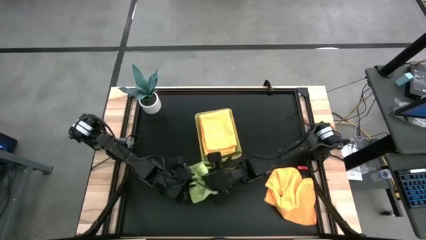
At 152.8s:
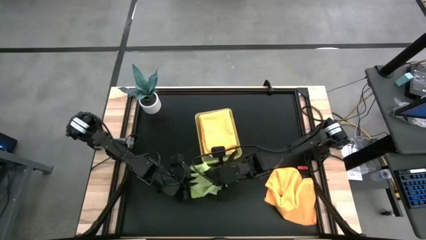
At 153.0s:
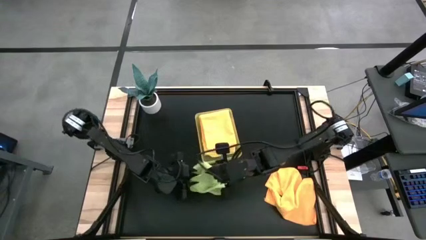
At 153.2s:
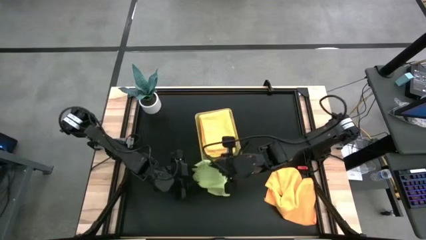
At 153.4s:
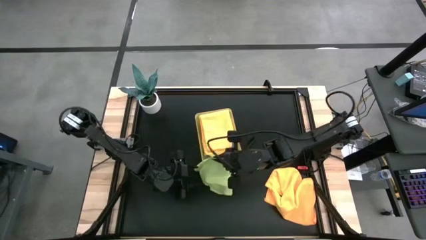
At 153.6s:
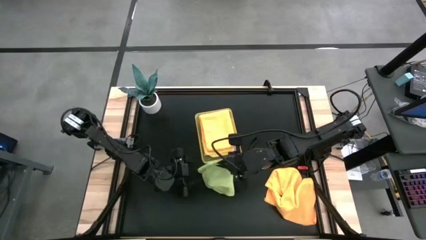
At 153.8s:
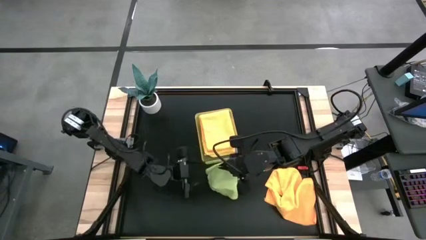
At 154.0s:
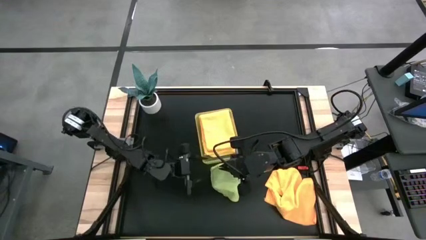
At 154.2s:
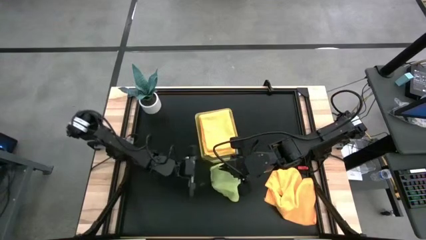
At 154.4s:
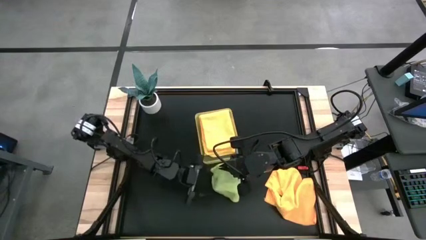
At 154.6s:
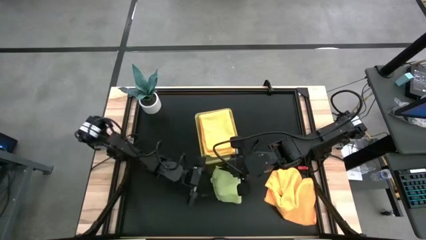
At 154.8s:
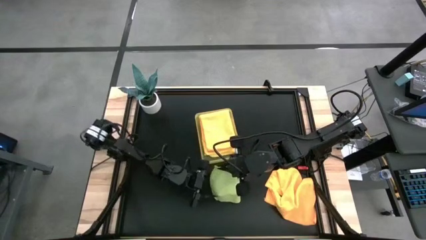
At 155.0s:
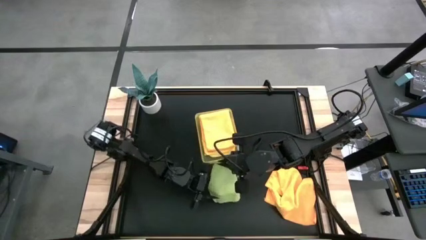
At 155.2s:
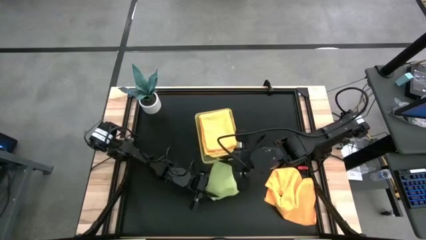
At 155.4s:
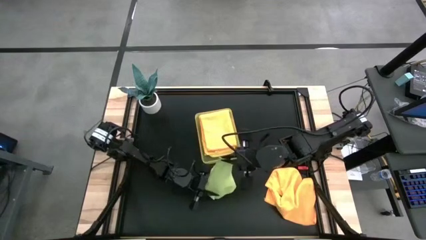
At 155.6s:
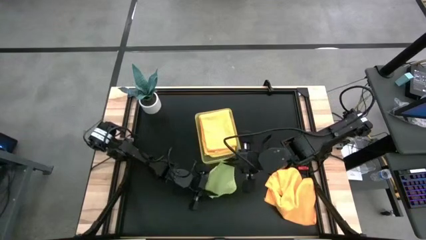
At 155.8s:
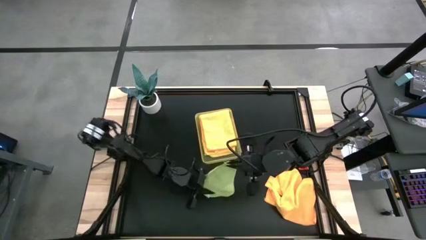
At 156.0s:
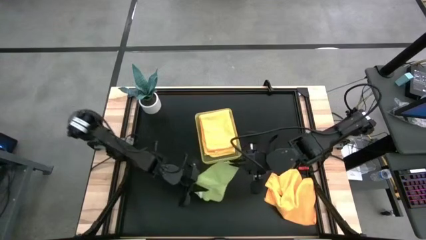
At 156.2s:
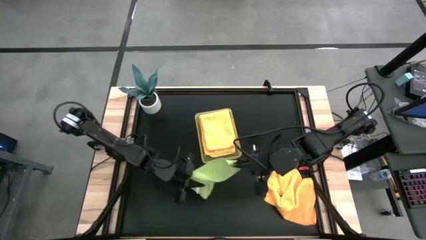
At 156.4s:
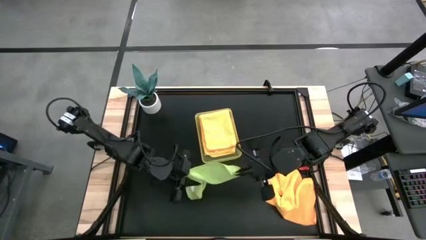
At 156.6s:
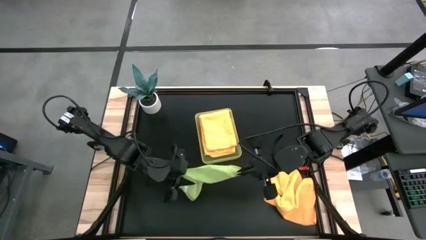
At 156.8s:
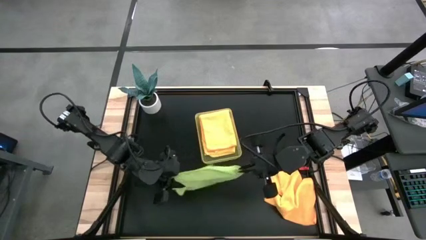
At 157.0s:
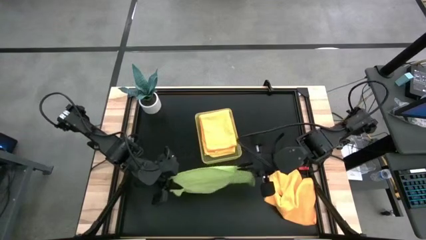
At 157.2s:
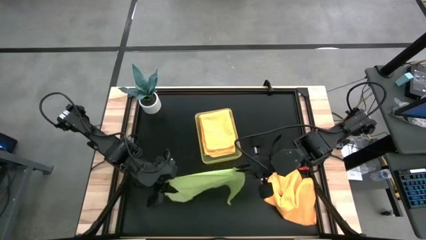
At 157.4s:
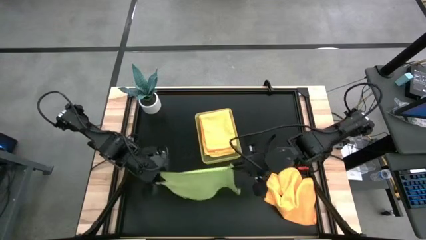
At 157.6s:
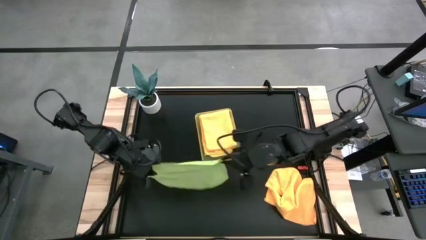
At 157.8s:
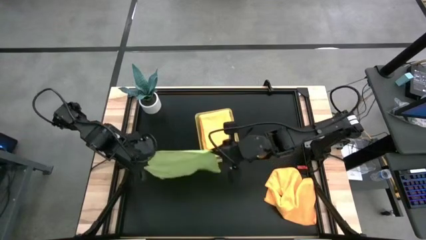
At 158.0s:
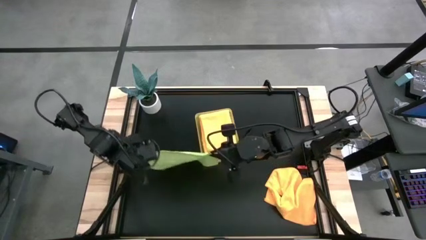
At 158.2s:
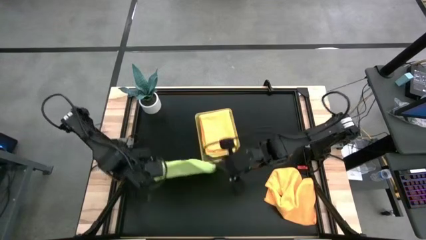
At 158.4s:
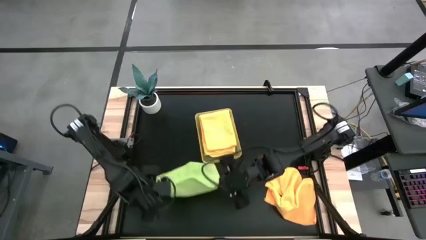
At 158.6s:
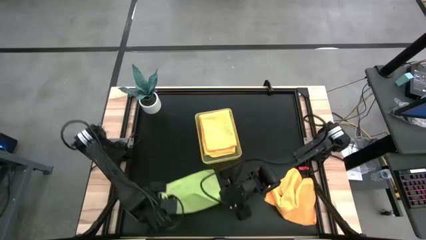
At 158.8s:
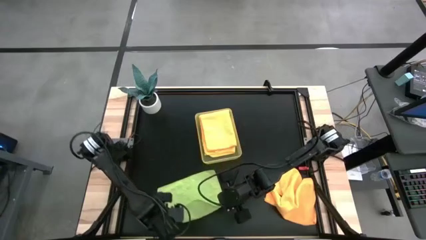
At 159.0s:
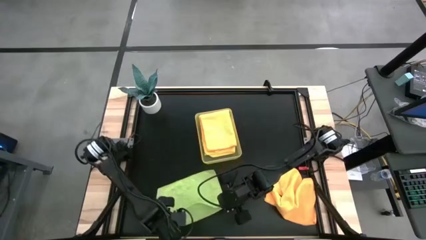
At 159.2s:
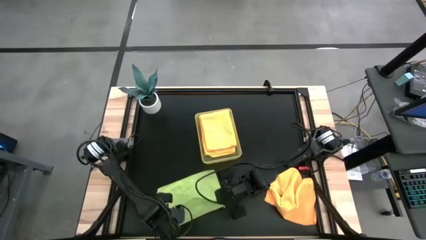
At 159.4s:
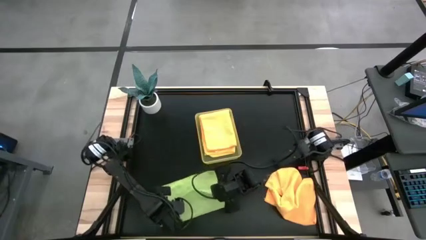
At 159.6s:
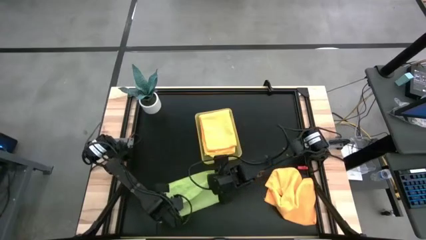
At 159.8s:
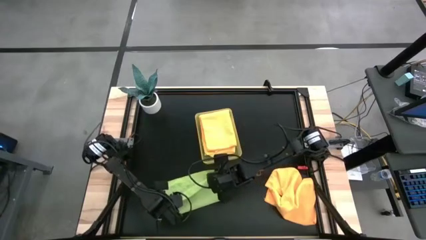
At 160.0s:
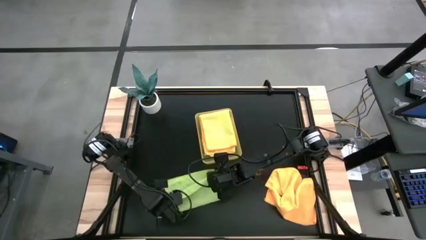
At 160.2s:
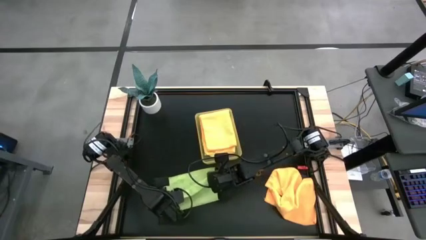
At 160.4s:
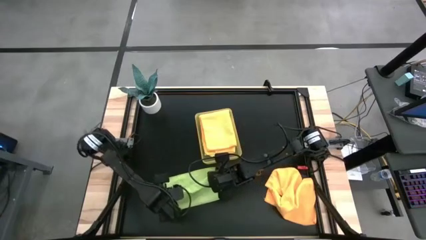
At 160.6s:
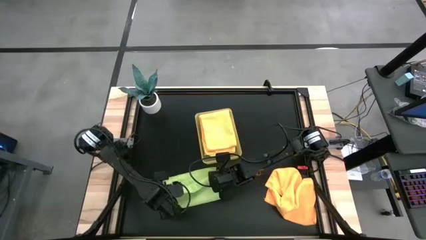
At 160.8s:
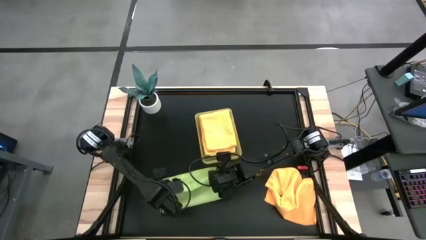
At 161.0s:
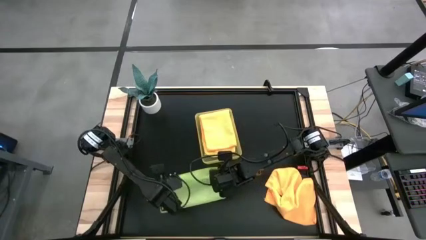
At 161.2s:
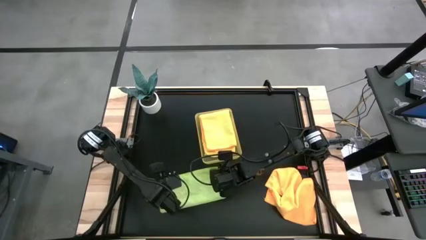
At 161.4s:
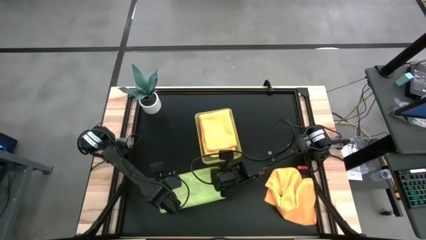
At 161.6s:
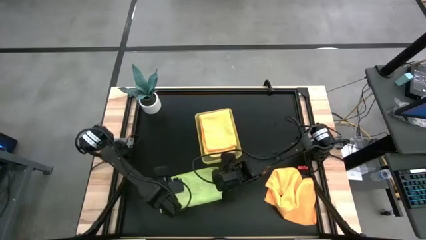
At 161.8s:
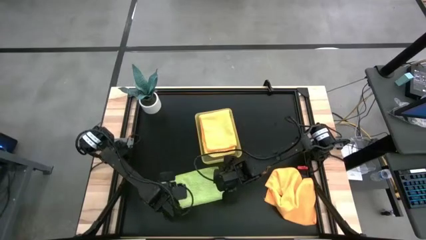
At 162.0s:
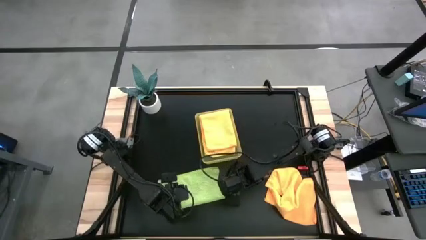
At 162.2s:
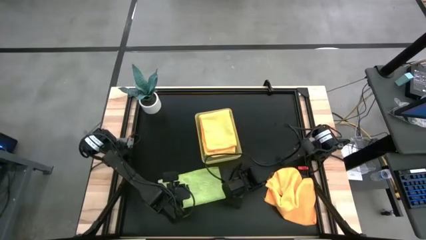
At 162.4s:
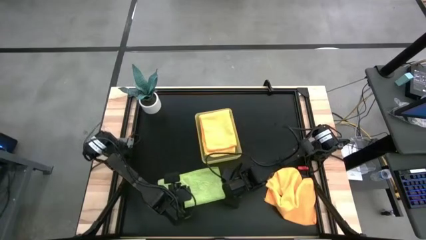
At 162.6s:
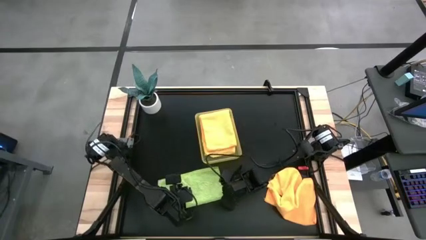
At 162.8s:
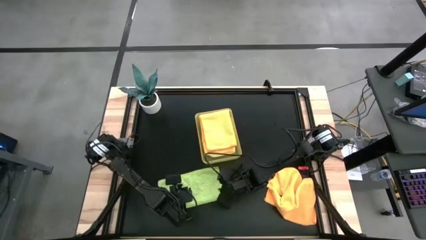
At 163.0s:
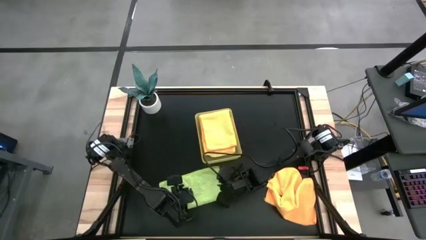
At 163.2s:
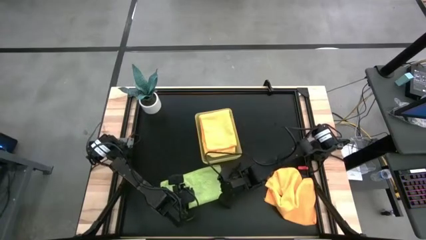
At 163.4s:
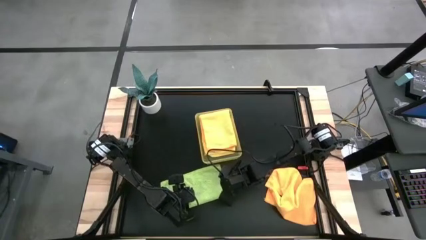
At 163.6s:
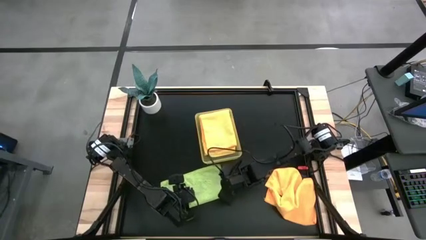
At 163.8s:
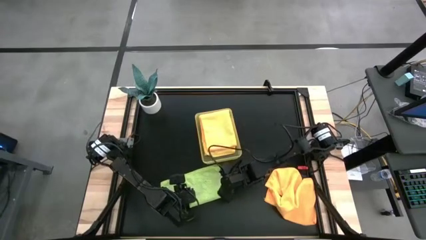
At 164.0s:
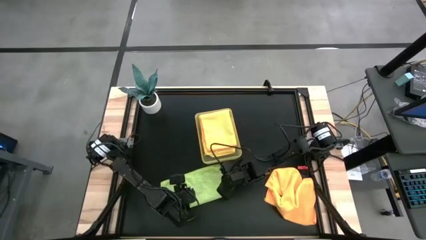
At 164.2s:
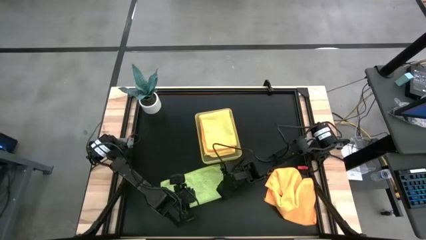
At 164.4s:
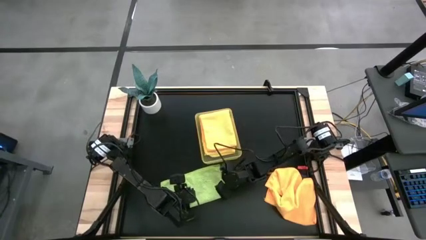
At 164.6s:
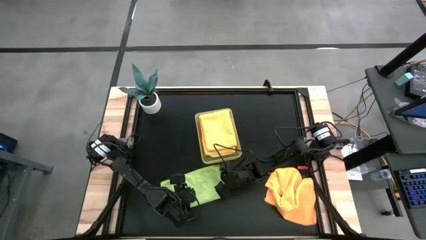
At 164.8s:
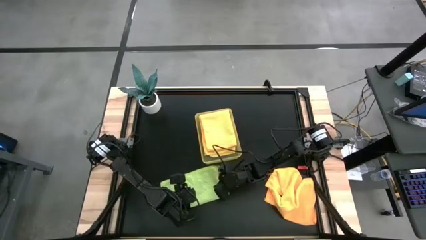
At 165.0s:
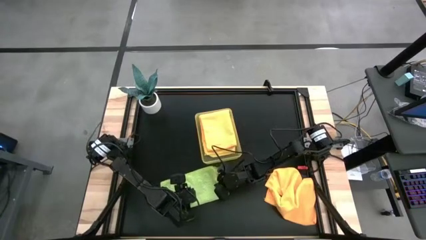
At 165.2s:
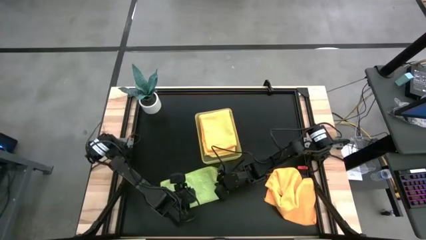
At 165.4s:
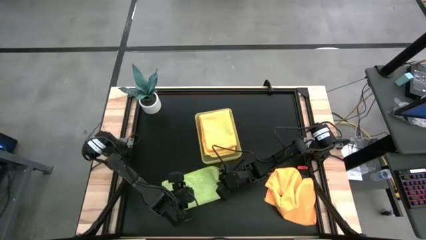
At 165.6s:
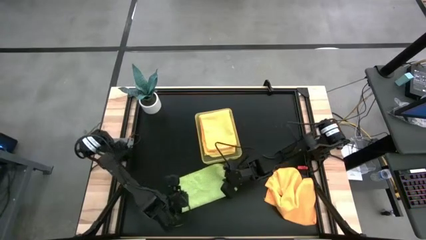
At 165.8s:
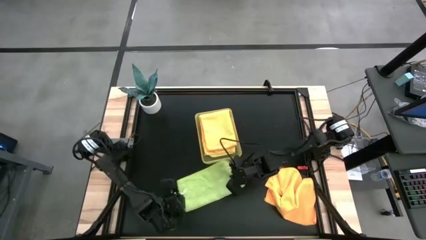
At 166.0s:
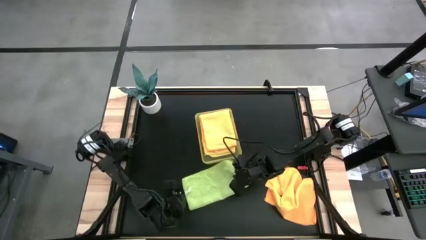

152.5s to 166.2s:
Task: Fold microfiber towels
Fold the green microfiber cloth

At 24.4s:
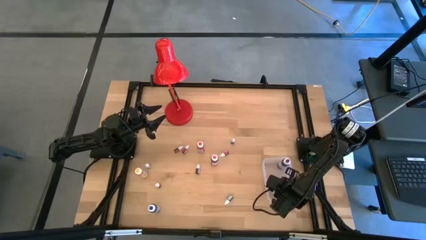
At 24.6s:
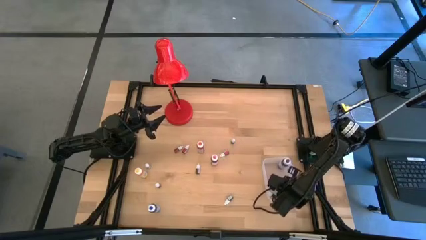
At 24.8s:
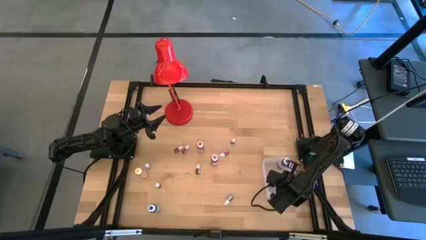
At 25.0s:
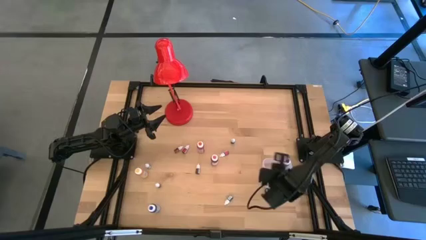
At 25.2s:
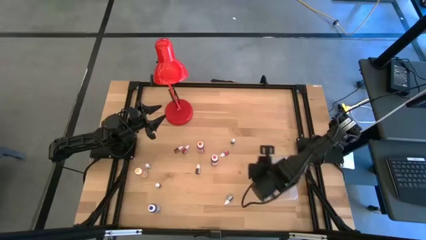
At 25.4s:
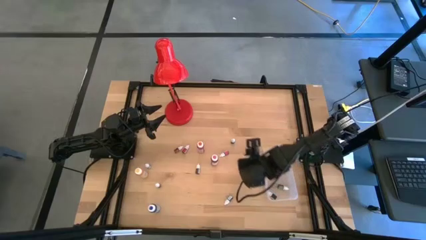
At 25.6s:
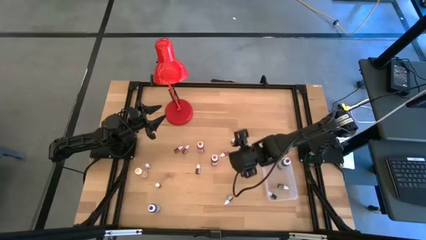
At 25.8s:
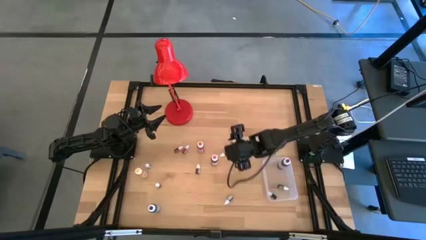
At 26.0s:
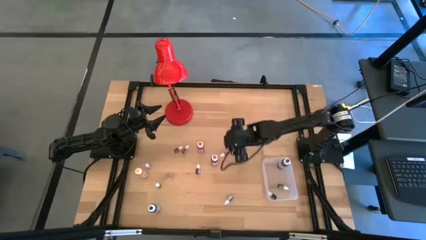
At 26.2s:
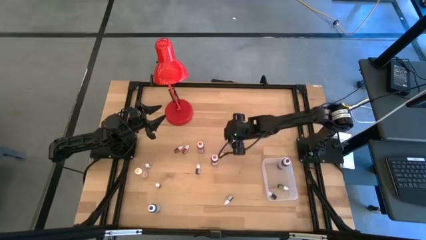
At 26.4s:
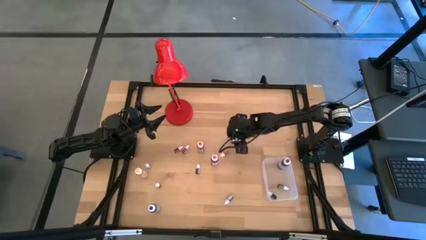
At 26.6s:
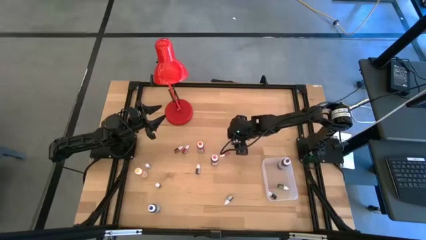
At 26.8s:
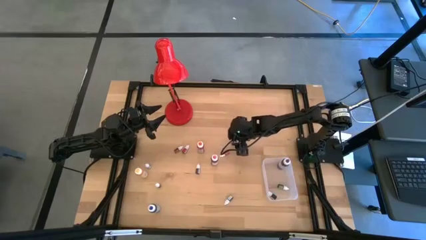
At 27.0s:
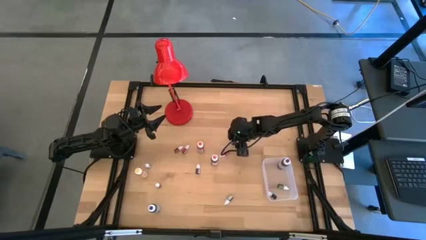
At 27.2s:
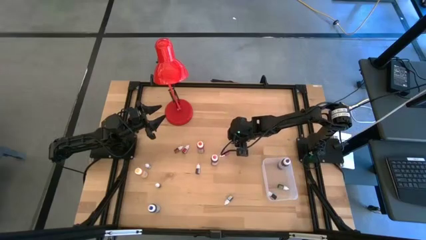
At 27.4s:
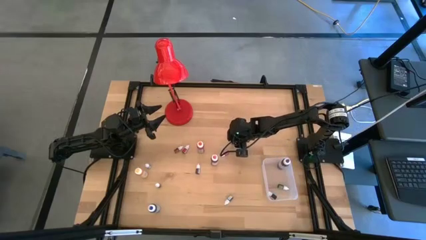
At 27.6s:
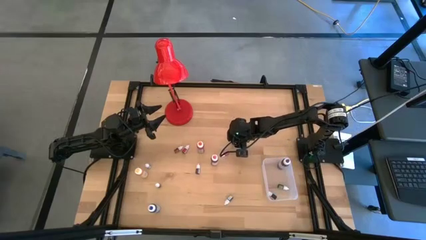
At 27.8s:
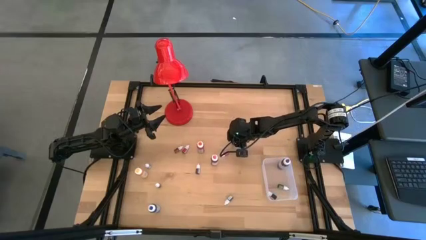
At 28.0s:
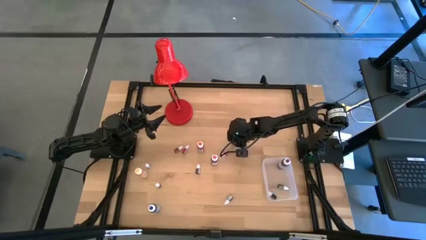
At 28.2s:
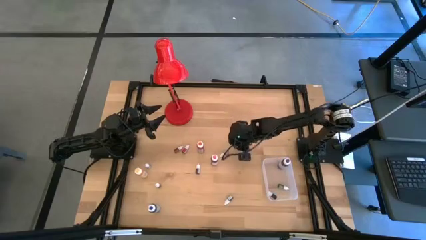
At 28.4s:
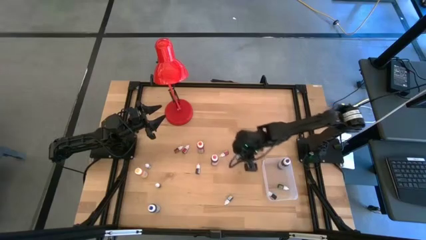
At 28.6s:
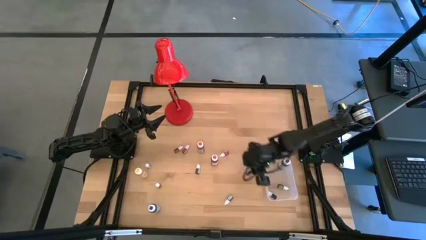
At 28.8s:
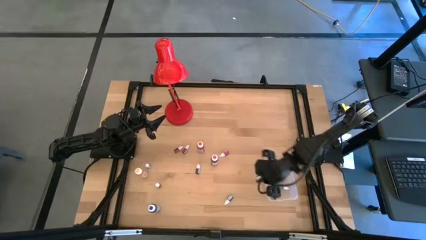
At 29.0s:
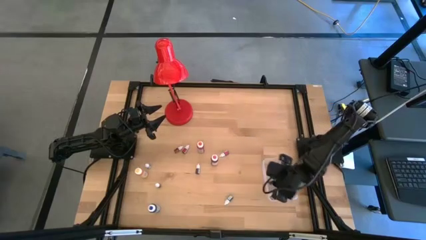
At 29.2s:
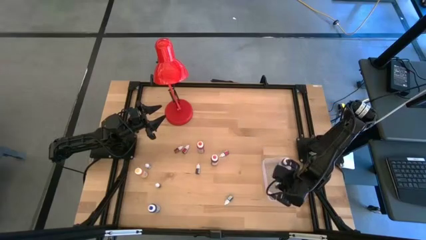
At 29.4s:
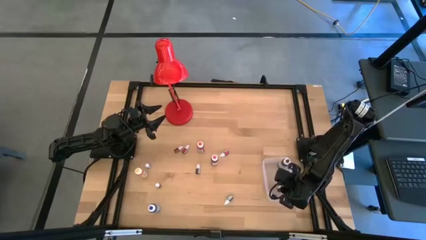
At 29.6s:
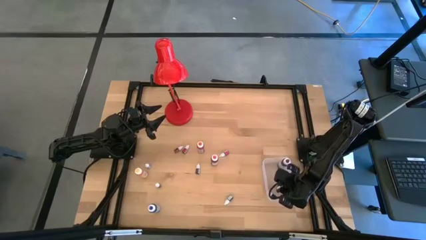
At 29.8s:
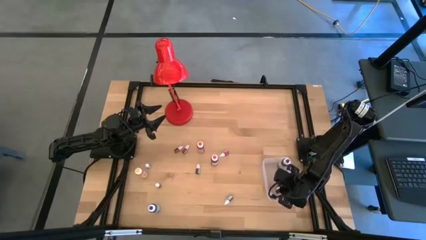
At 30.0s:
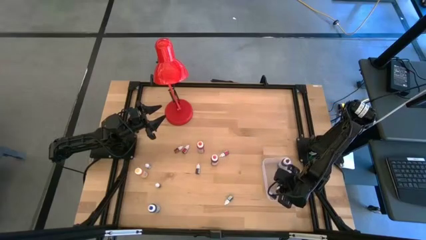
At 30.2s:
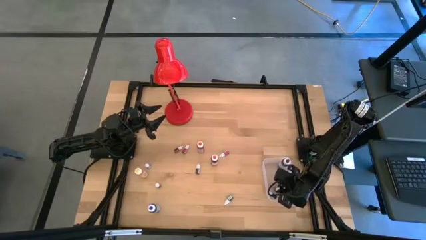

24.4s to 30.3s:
Task: Pick & Place food coloring
Put the top small black bottle into the transparent container
